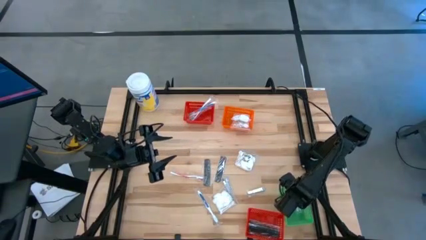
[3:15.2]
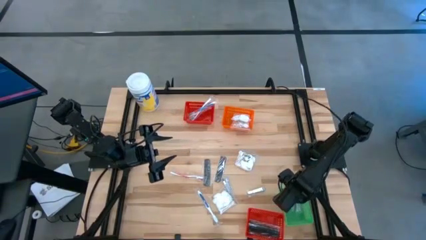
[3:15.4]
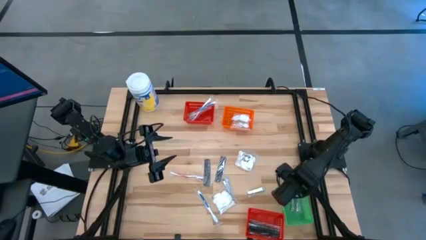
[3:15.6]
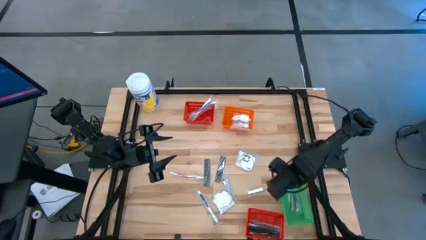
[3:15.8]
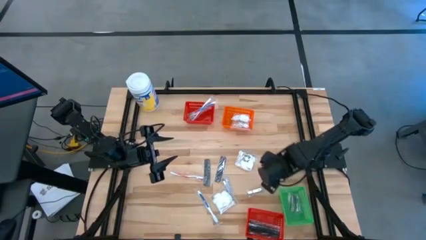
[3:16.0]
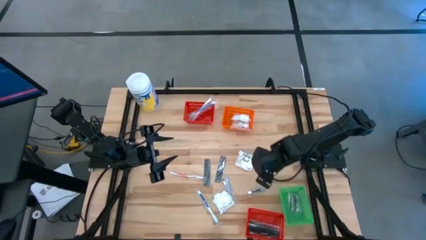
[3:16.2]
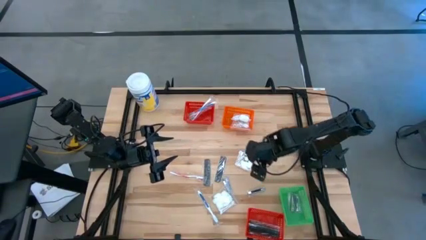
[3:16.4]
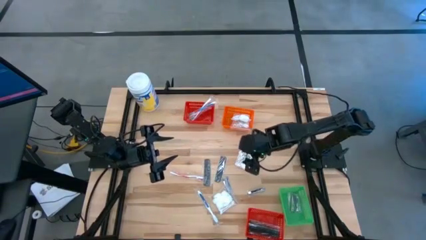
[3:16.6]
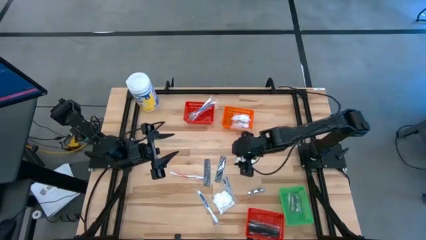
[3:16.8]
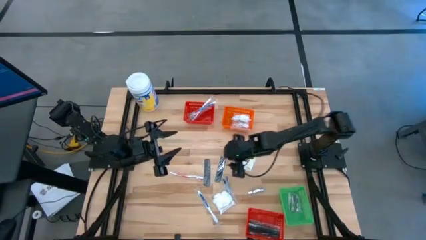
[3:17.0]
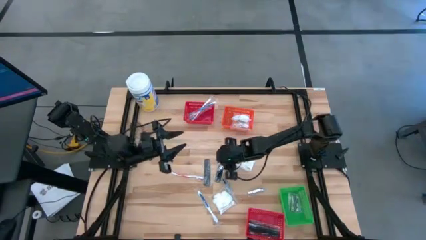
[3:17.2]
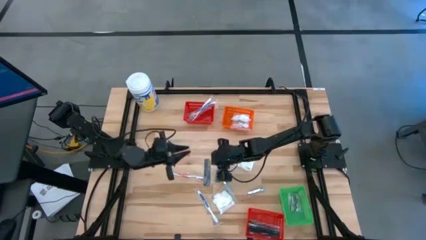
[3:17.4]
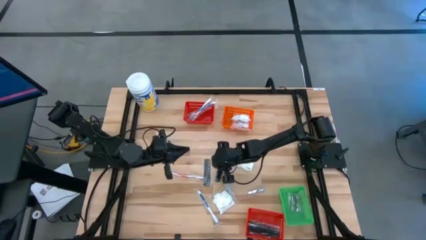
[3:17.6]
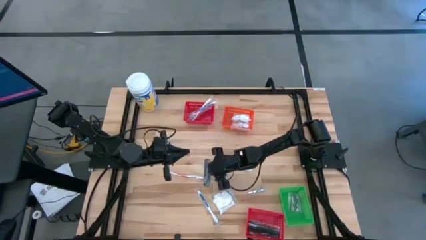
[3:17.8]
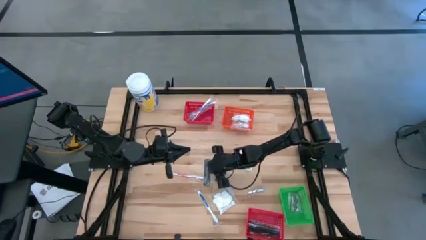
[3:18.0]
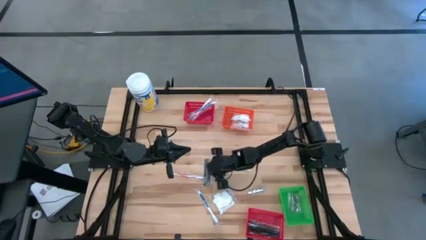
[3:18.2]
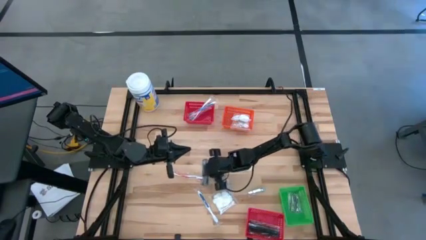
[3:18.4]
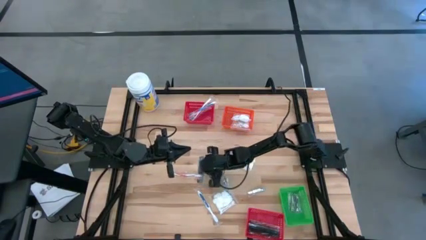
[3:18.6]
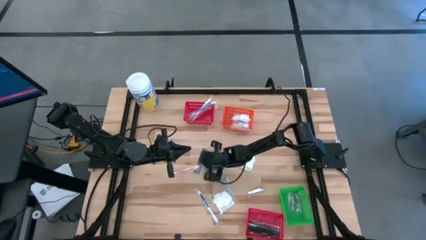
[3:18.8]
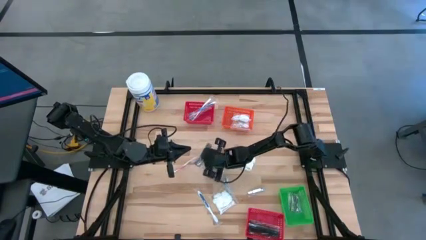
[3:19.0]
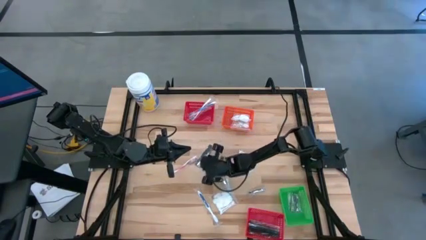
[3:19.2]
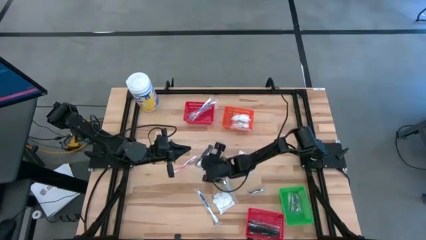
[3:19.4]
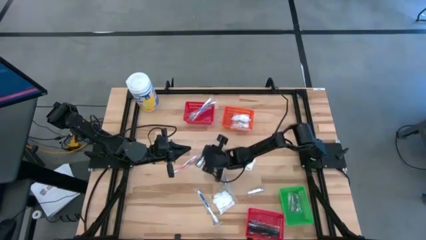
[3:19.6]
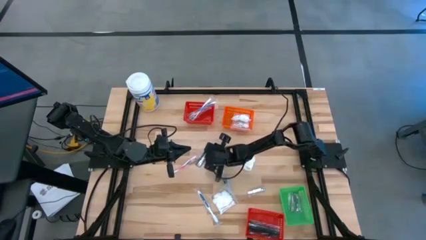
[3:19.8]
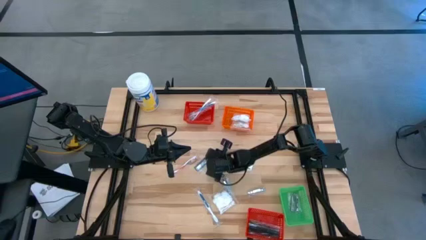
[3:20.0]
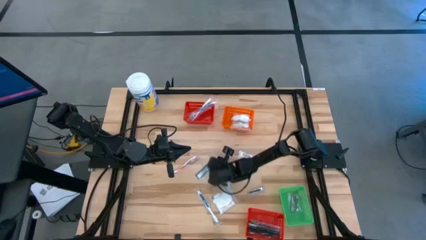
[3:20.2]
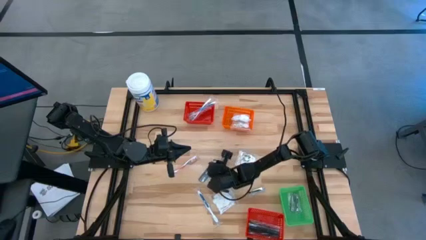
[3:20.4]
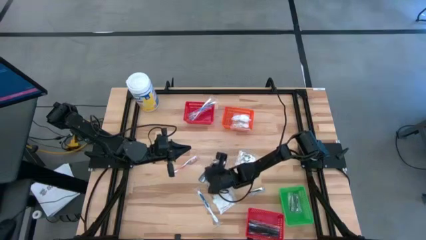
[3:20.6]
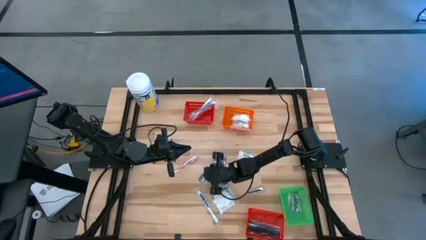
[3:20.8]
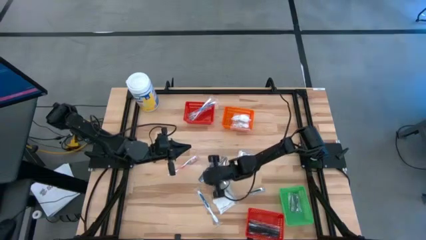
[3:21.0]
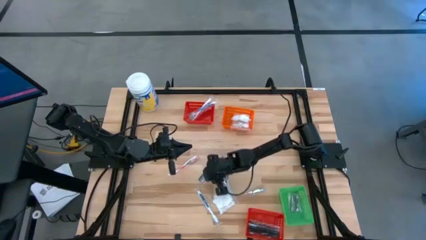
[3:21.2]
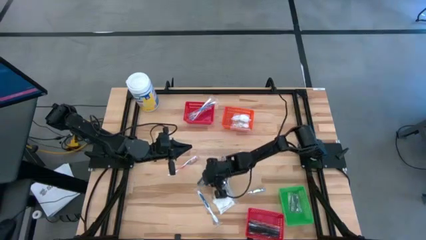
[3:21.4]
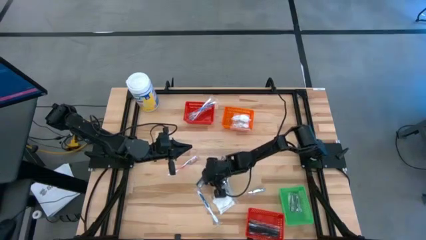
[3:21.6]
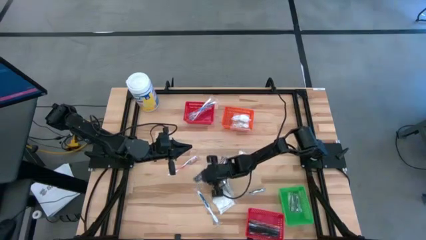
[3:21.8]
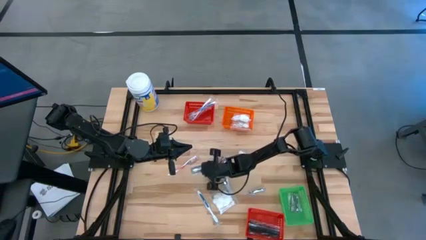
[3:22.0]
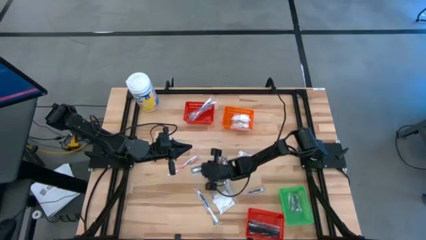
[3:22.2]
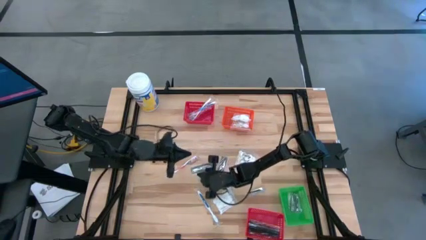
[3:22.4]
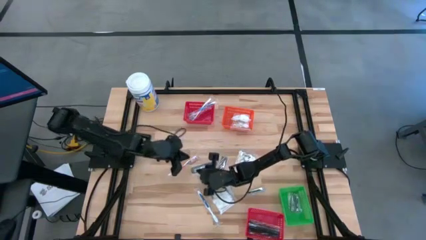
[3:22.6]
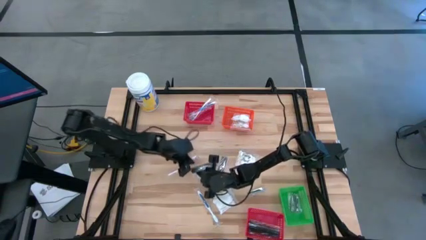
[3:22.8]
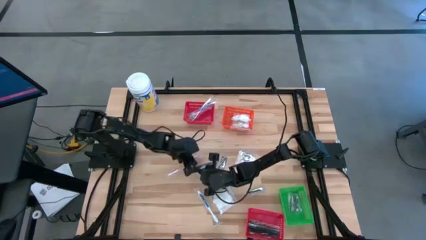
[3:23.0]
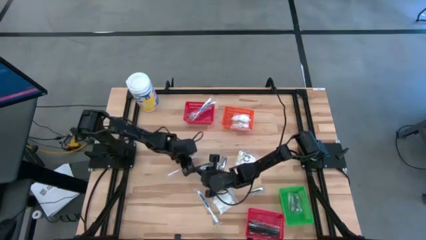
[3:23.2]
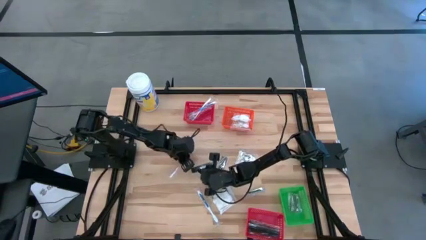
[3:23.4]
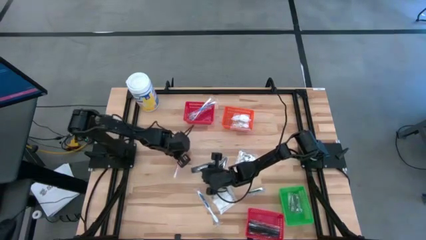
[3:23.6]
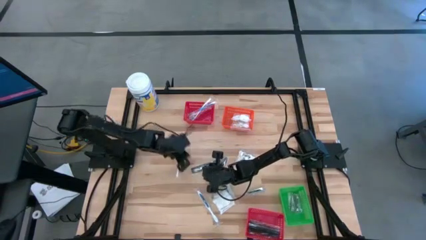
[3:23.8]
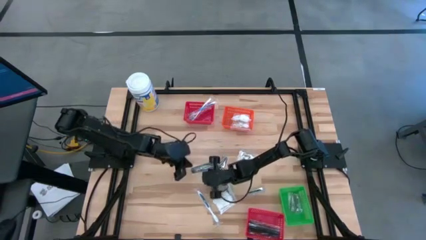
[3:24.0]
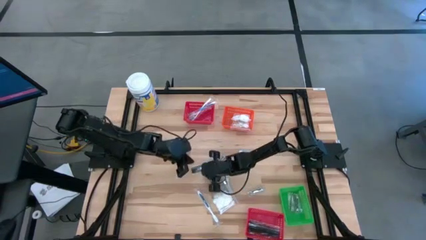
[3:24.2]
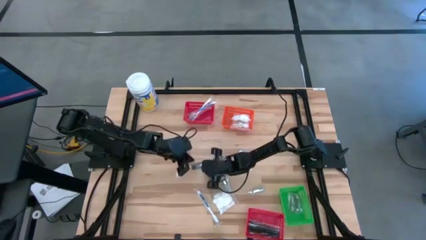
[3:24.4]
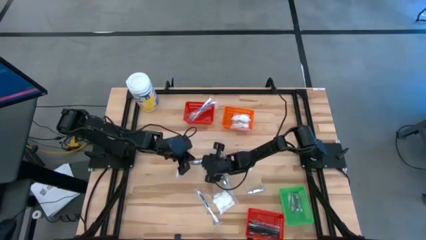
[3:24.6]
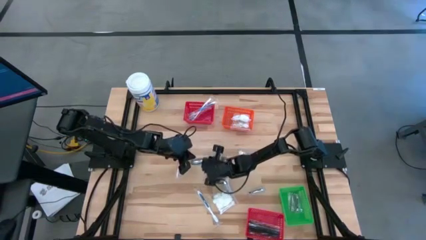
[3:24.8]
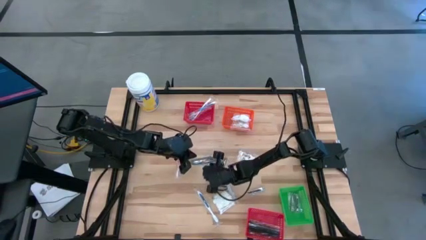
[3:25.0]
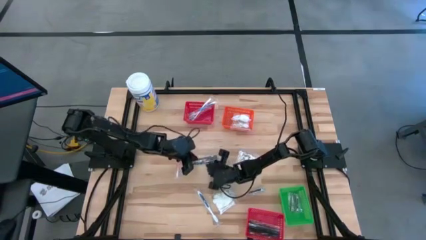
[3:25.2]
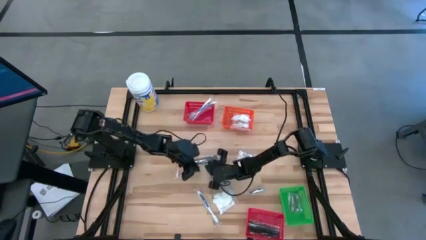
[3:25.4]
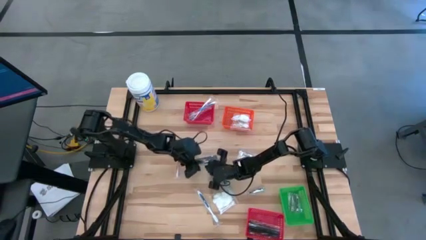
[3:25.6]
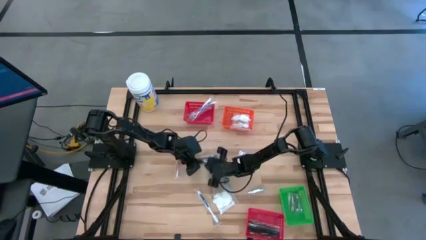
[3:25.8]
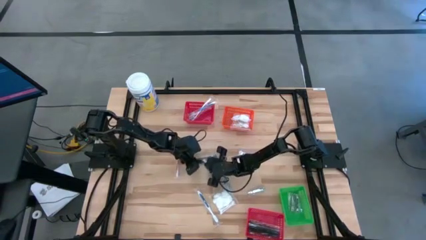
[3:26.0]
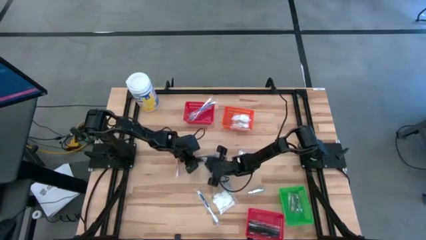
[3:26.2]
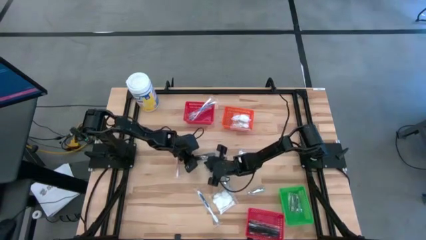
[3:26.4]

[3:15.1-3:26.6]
Task: Pick & Place Travel size toiletries
Put the black comb into the bottom red bin

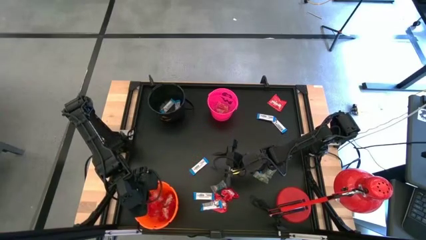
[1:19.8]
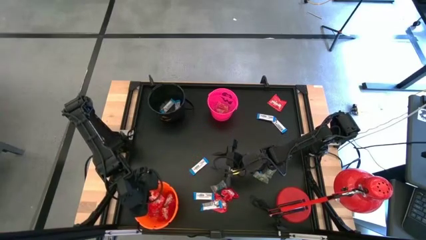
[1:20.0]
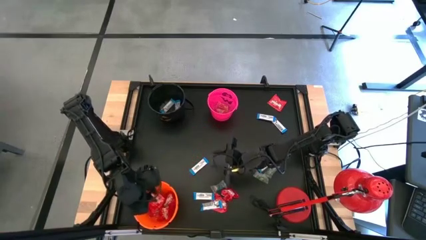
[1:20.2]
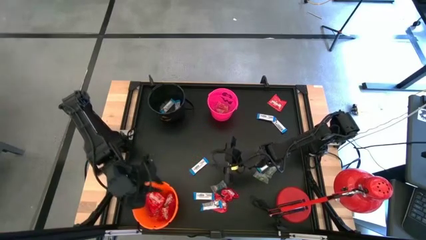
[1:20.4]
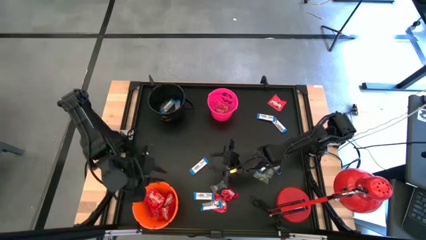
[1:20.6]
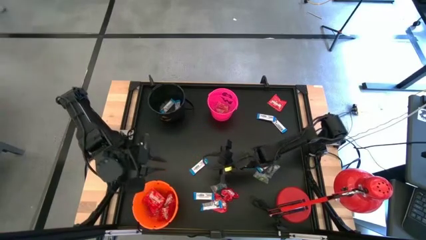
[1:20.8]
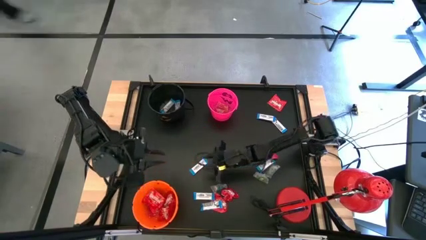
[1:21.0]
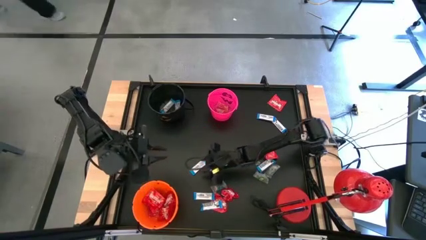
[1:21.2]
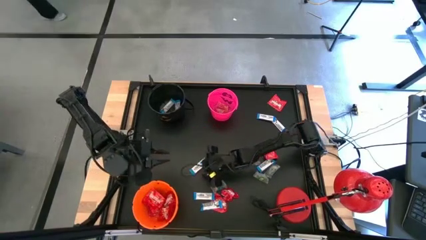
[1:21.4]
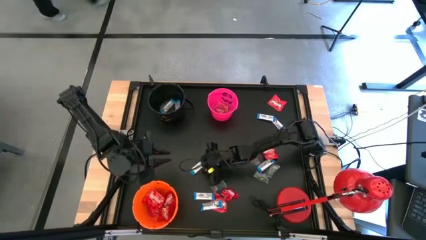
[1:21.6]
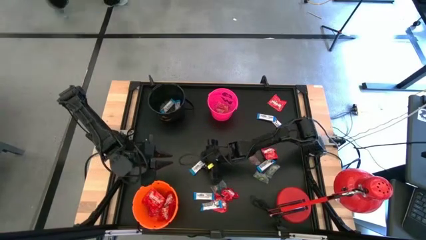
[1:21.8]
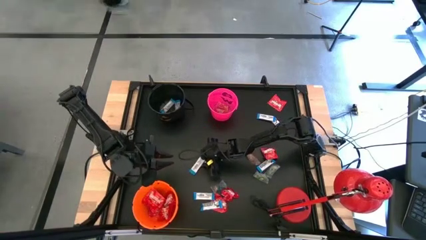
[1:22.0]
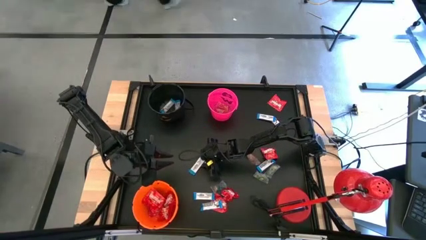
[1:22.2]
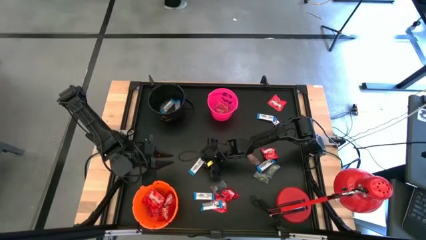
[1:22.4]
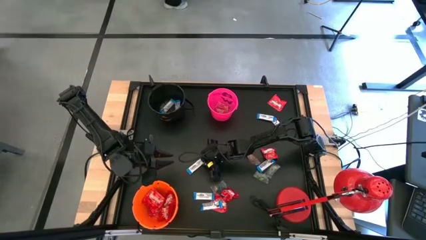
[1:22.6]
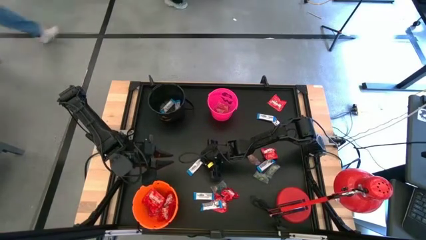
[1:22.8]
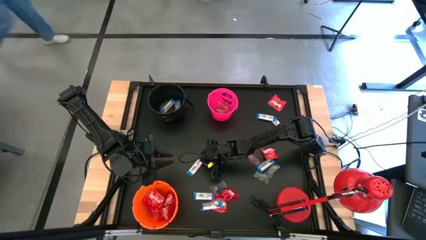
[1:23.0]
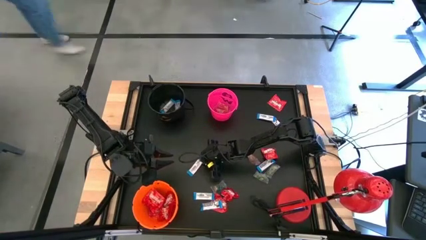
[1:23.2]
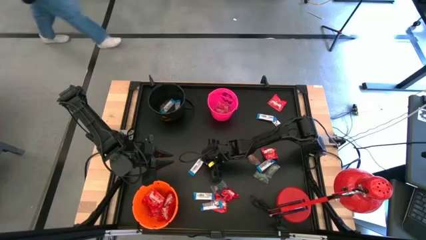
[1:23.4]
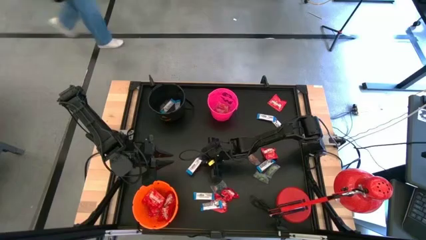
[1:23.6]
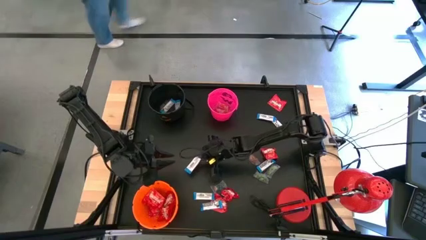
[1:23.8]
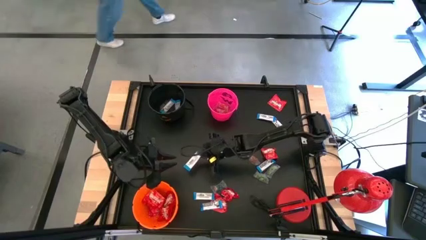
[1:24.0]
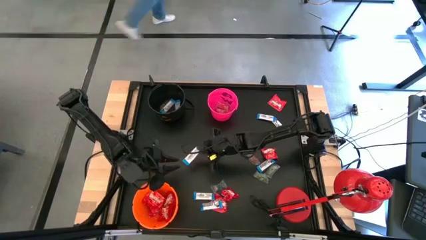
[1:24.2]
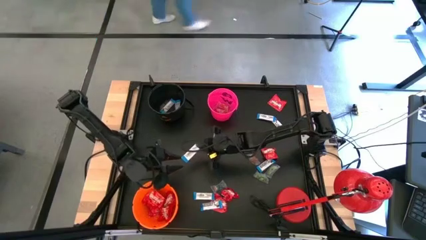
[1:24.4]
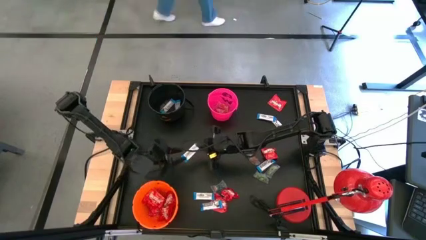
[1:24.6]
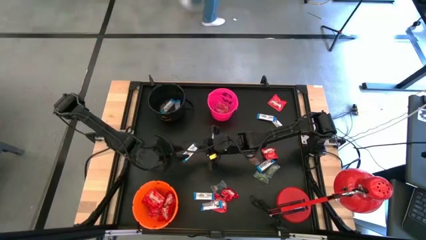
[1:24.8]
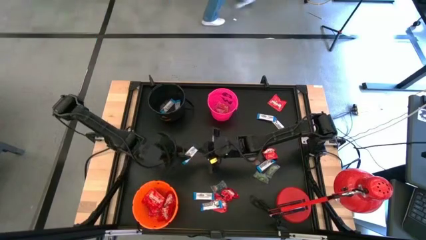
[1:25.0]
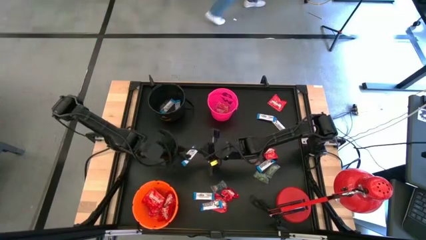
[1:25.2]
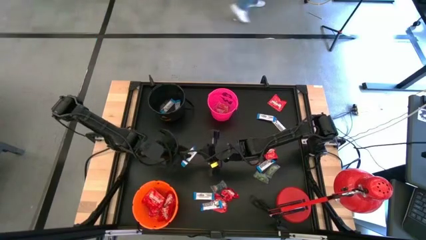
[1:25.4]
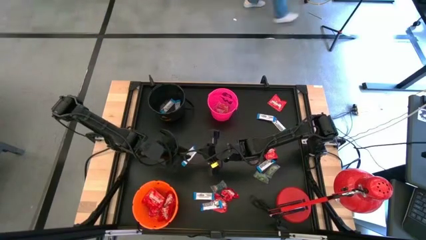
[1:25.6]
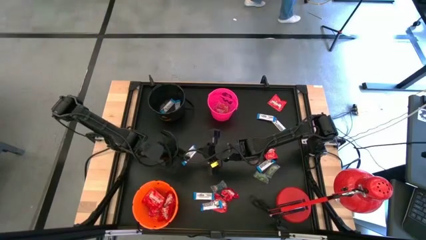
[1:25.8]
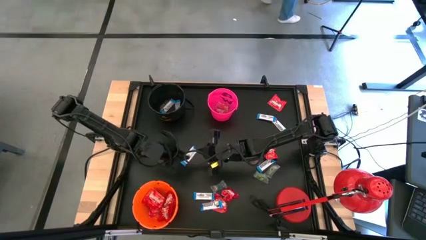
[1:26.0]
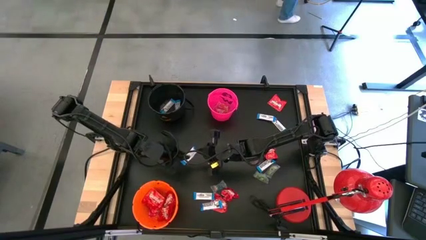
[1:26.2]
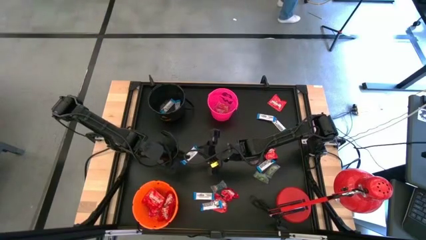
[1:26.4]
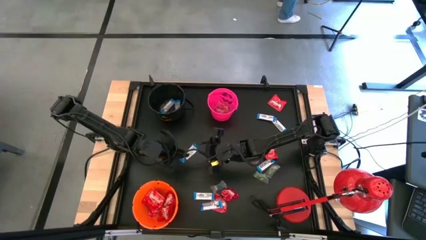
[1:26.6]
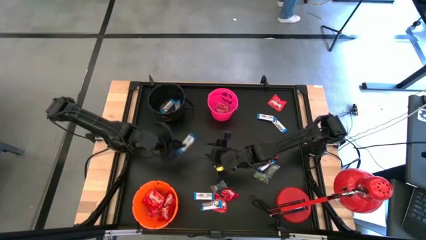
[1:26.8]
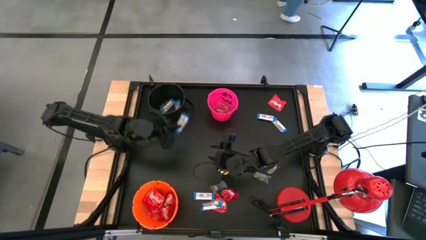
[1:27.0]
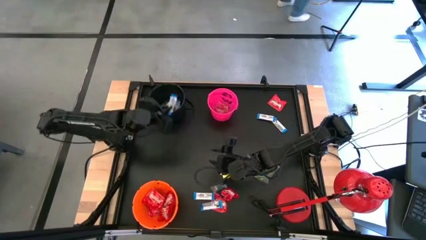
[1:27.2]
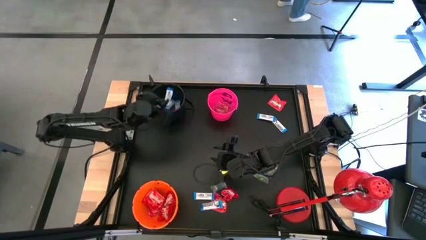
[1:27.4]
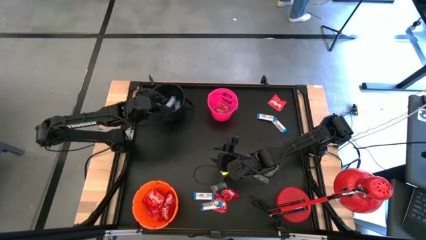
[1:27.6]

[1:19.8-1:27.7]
Task: Organize candy in baskets
Put the white chocolate bar into the black bucket
